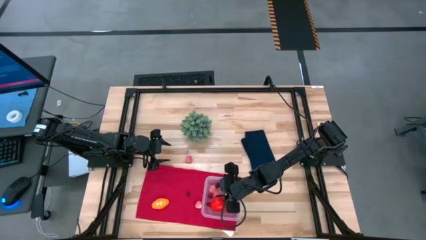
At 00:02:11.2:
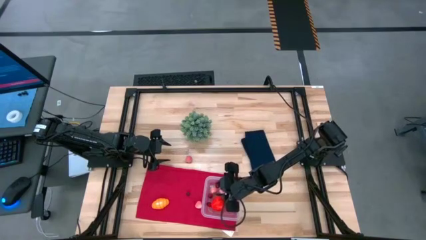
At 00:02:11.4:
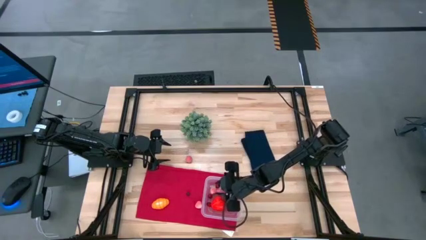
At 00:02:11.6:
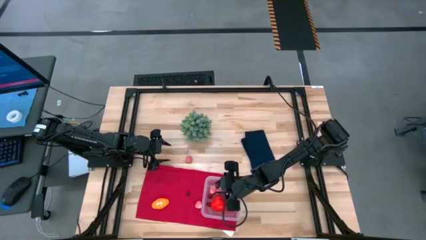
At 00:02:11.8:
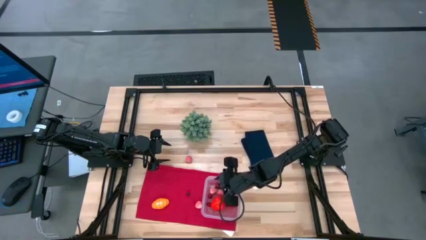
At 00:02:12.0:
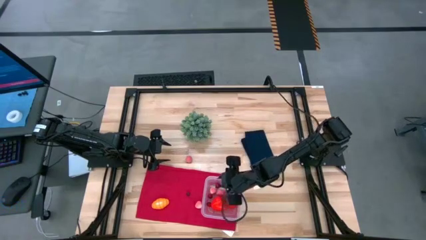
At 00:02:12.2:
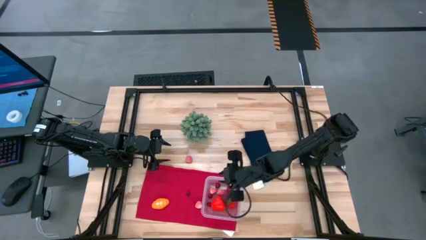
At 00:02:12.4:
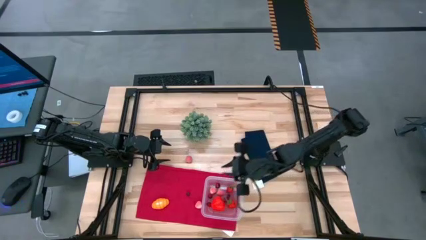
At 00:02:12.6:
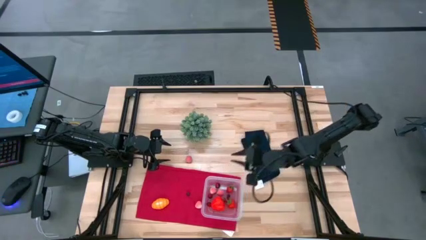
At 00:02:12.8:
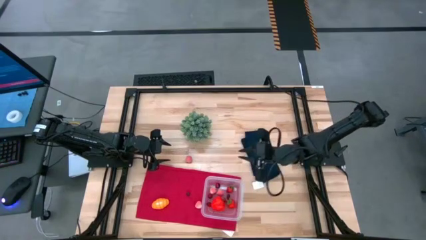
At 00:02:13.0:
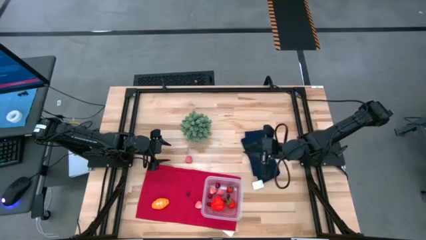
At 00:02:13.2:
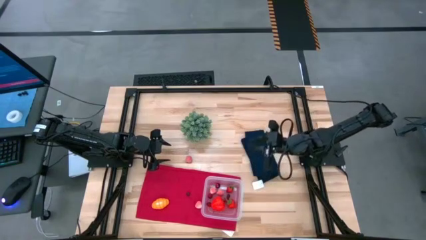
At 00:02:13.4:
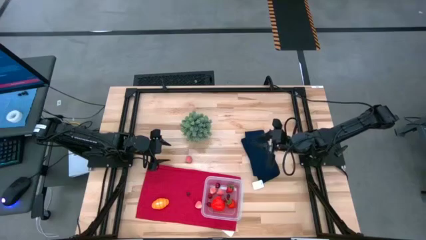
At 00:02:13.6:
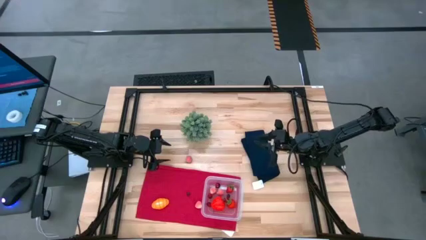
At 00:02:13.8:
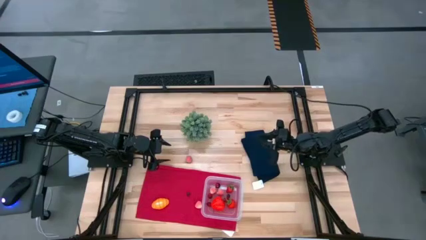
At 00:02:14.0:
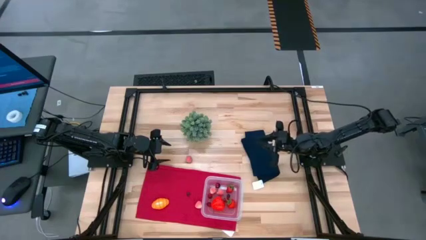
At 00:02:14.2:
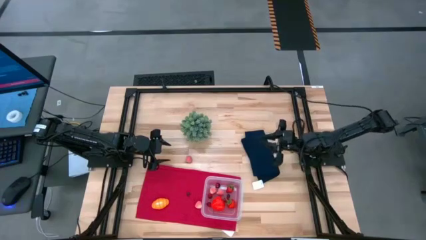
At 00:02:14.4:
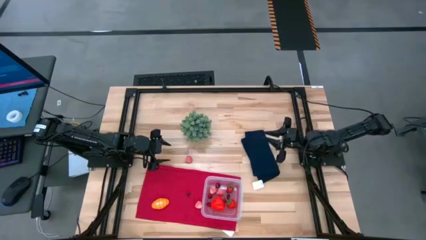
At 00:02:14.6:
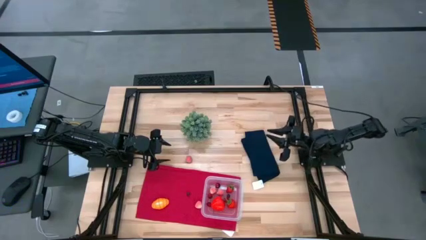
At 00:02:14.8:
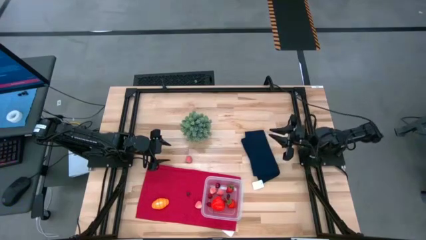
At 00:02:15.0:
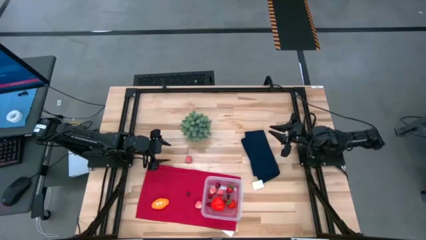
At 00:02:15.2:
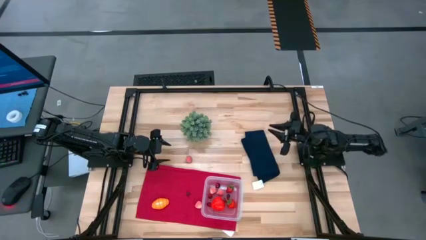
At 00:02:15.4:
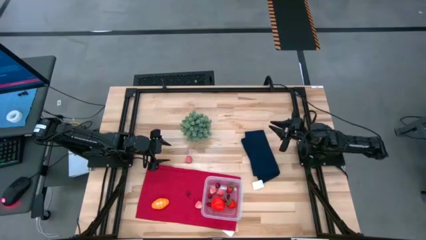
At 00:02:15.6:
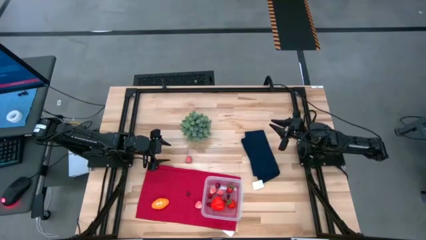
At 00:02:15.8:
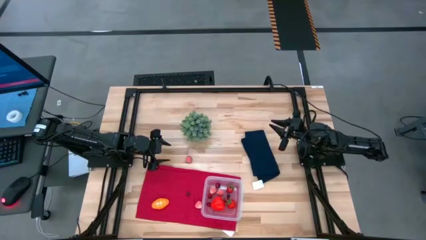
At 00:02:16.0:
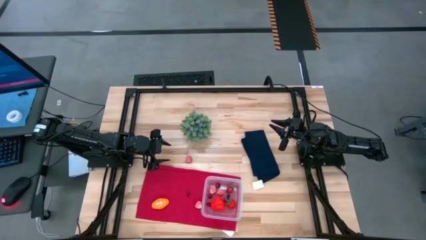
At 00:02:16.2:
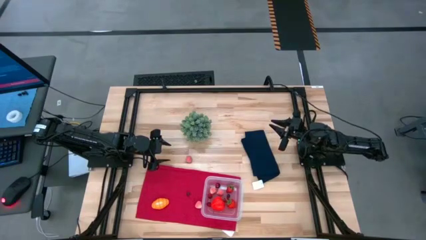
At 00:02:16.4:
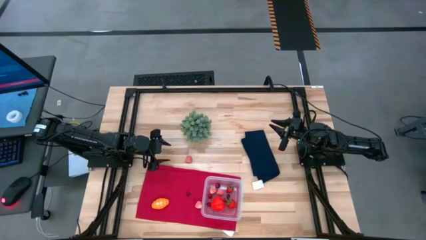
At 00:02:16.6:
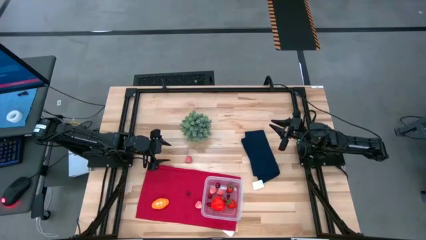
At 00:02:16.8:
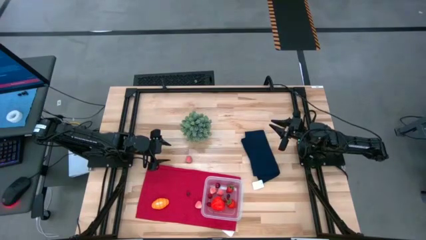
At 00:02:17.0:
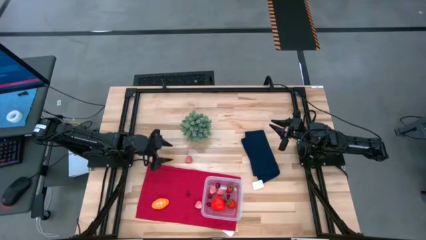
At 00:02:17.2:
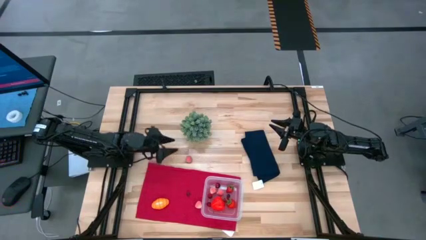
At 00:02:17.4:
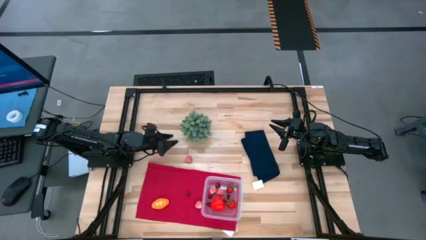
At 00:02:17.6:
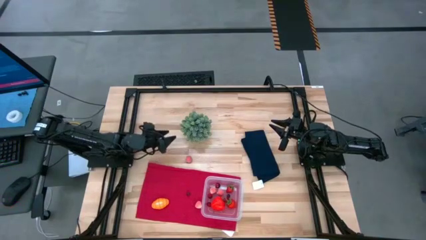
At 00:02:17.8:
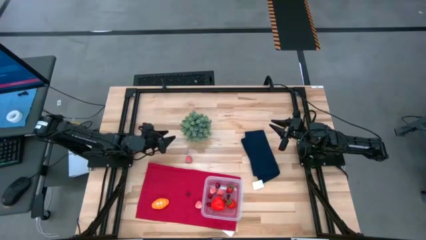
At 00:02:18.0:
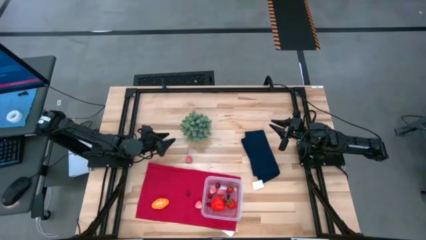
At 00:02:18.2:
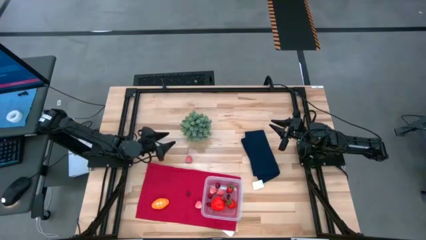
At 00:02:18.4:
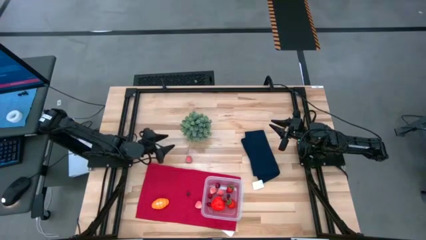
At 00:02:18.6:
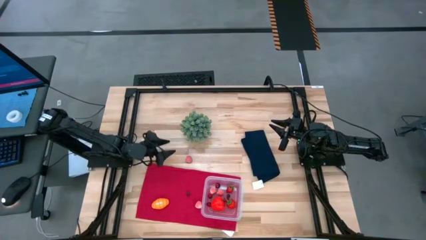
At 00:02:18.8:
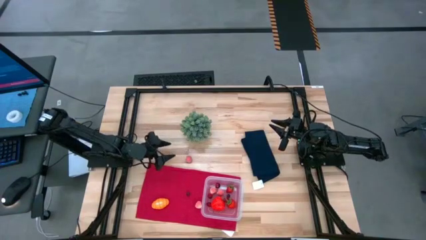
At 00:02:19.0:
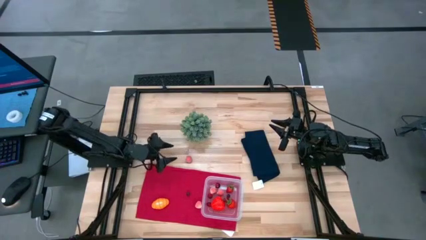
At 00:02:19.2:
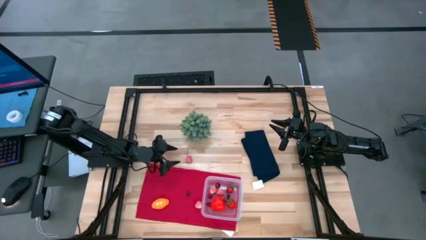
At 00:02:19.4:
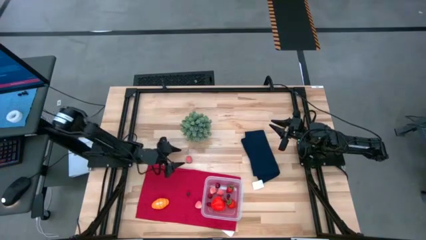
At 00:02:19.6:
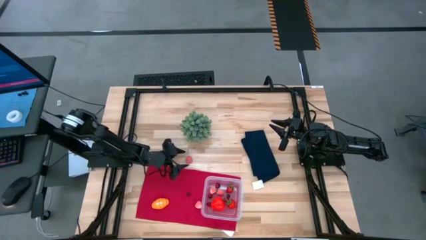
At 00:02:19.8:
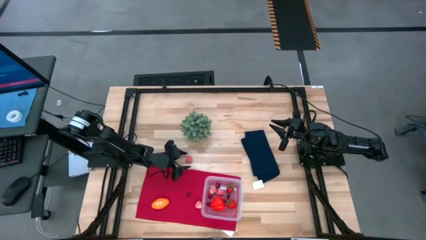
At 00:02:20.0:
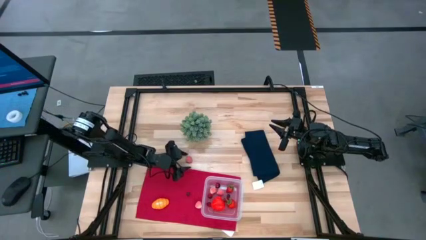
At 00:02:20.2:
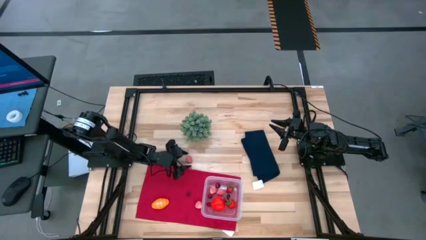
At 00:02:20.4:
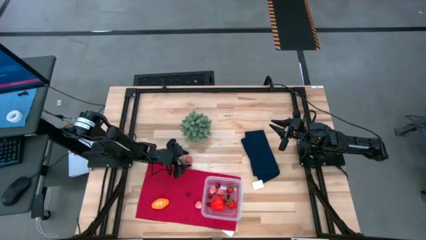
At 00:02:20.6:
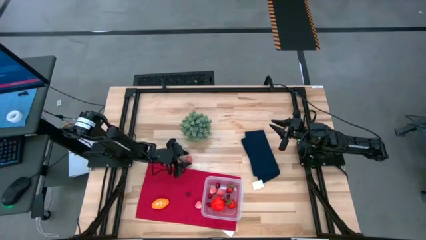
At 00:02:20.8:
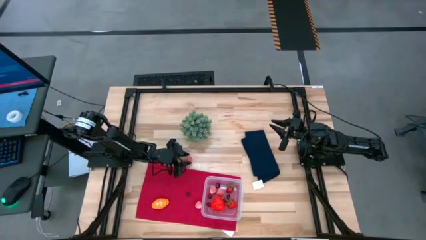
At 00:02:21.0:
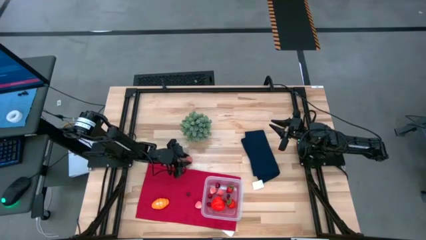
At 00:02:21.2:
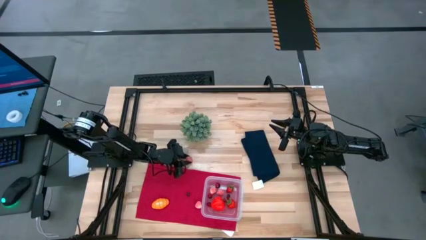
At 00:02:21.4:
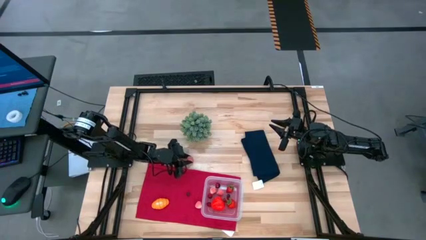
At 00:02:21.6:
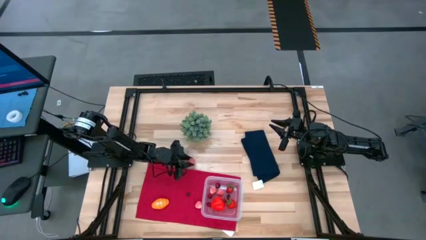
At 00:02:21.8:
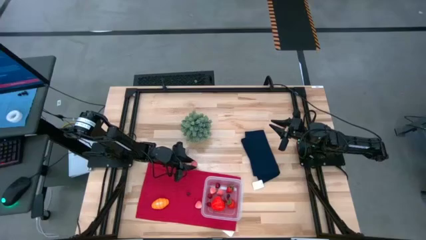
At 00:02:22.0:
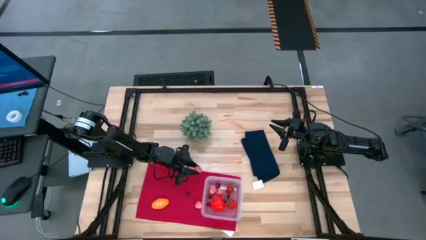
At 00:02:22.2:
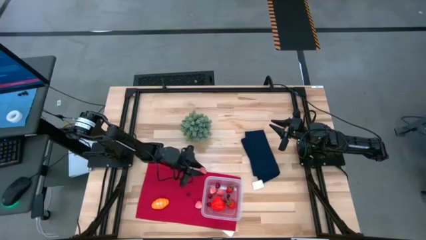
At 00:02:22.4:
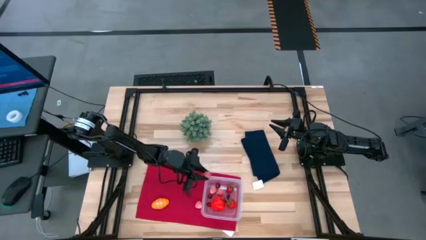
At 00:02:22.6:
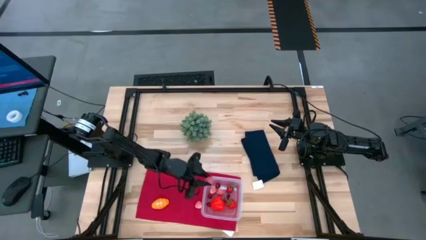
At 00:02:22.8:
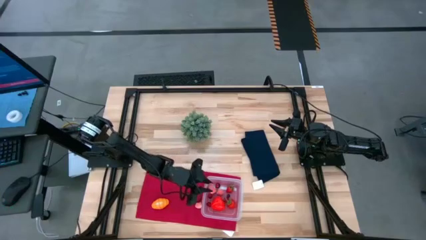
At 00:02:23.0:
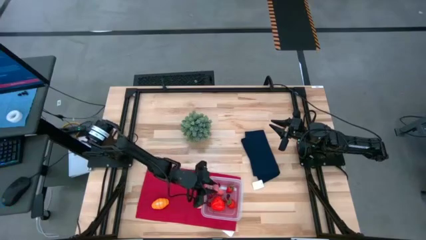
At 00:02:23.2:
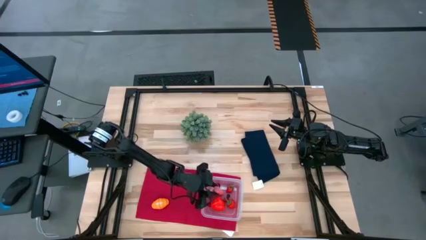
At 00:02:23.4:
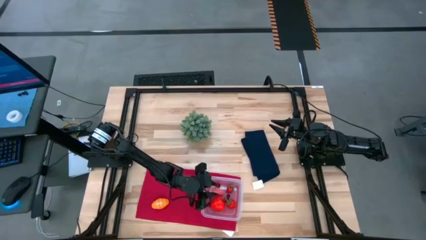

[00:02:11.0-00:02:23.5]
Task: Pick and placing Produce into tupperware
Put the top apricot into the transparent bin

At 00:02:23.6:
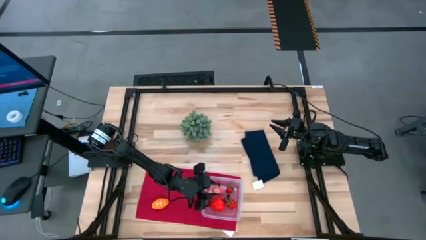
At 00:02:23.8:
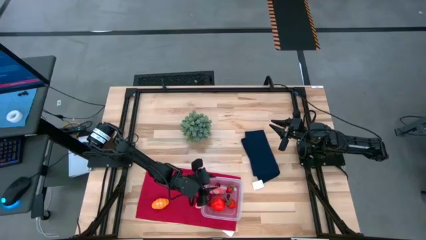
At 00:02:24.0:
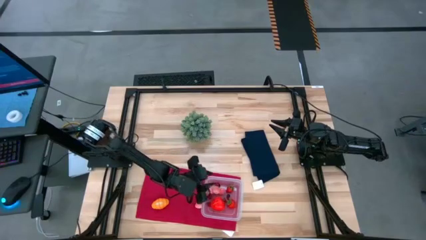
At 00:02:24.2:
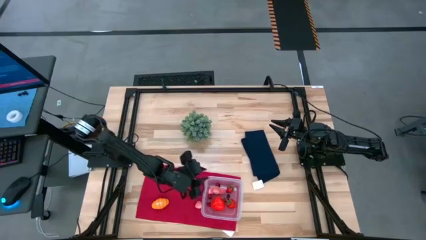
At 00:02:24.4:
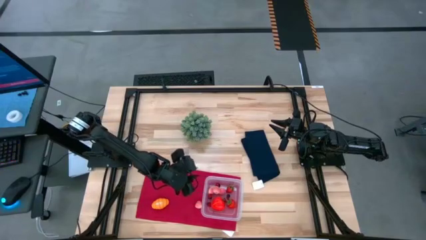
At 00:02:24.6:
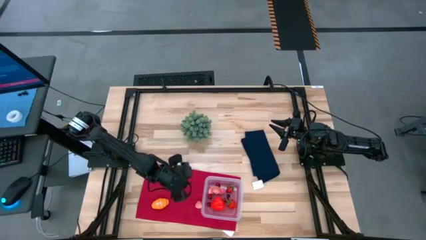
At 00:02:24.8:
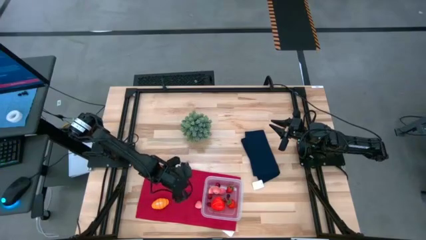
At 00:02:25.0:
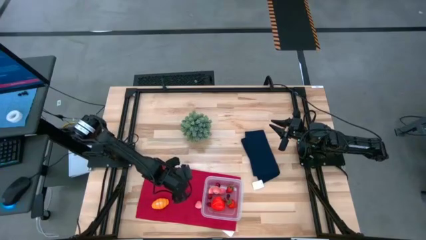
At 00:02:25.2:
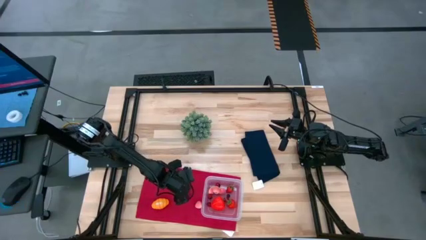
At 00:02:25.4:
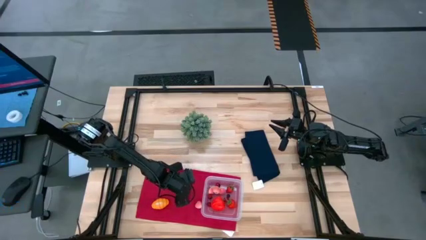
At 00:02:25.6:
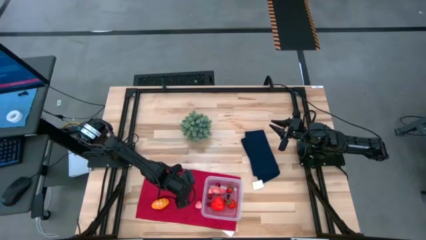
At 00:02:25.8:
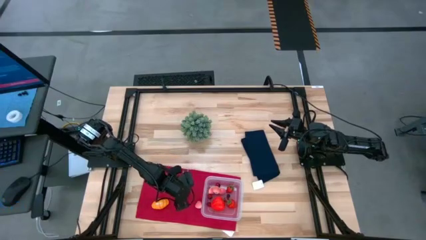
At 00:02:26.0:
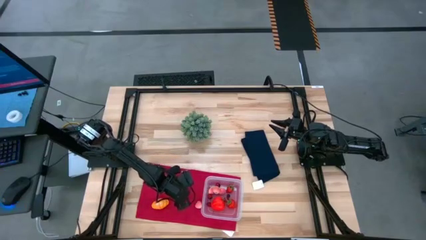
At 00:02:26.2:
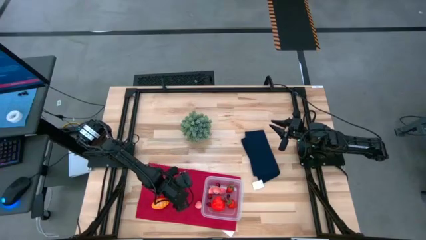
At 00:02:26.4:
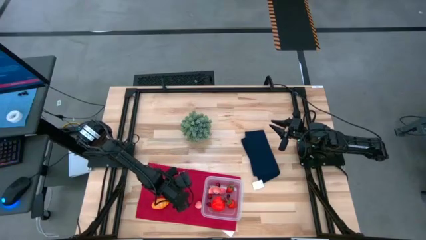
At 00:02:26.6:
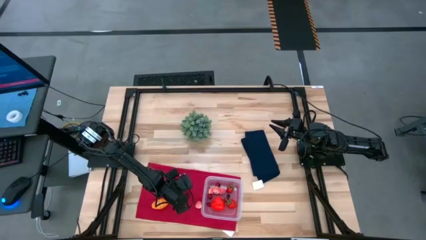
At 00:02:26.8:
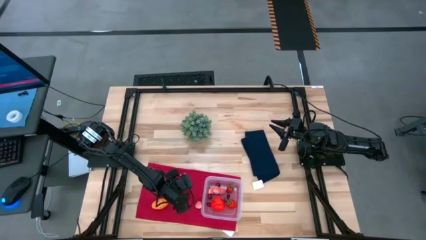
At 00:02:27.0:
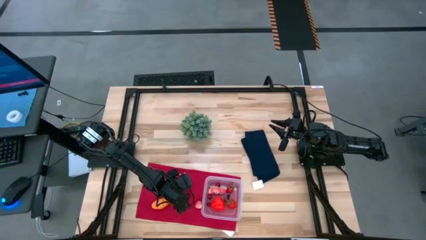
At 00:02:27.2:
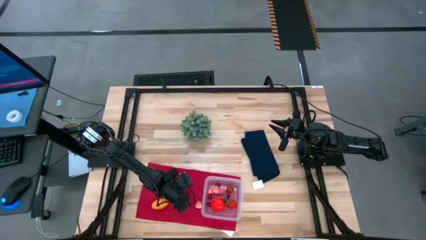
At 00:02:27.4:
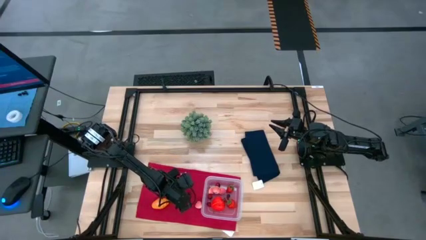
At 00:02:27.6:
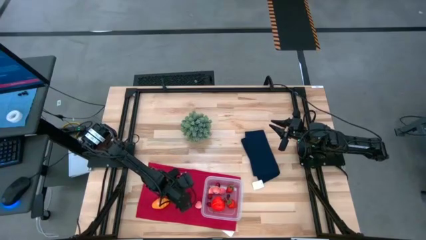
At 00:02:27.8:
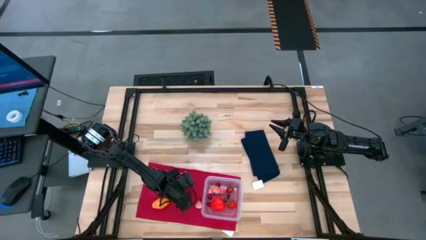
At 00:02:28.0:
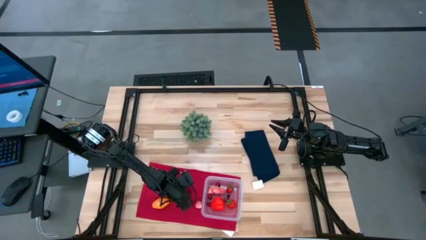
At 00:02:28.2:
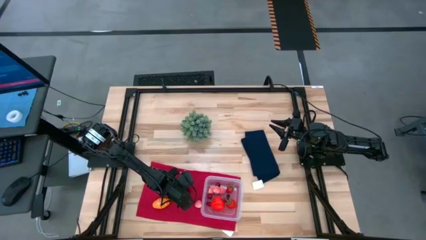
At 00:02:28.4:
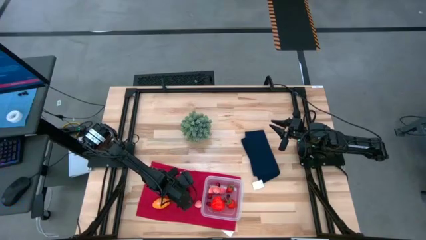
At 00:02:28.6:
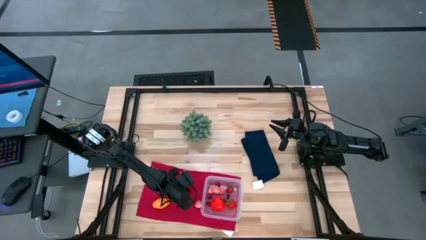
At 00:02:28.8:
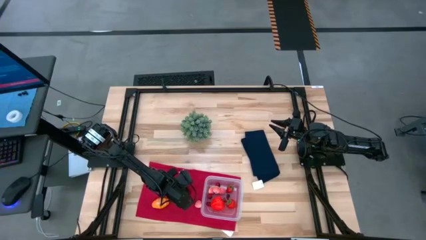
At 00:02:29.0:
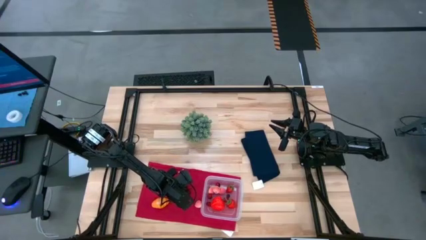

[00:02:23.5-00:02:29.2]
Put the blueberry into the transparent bin
